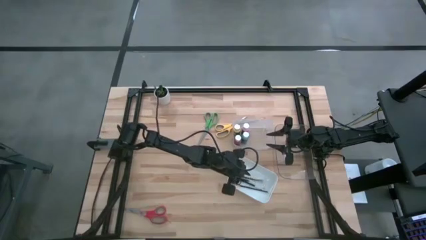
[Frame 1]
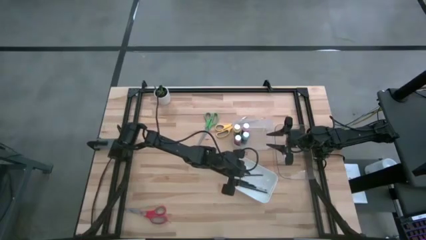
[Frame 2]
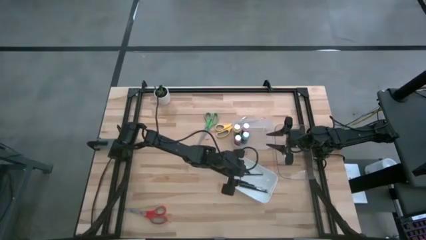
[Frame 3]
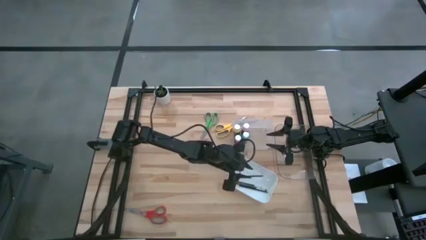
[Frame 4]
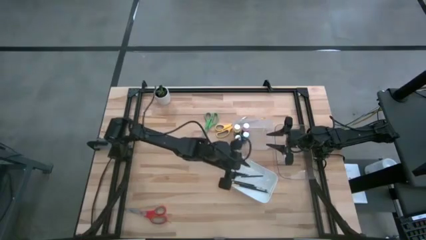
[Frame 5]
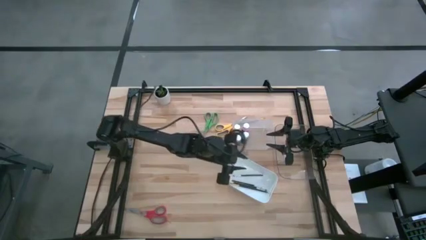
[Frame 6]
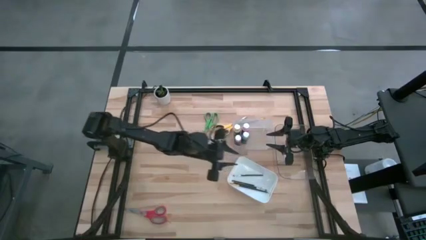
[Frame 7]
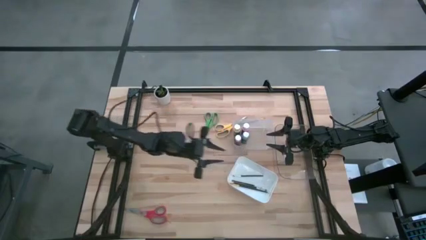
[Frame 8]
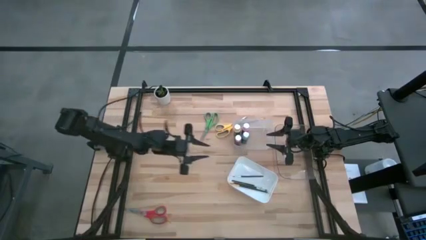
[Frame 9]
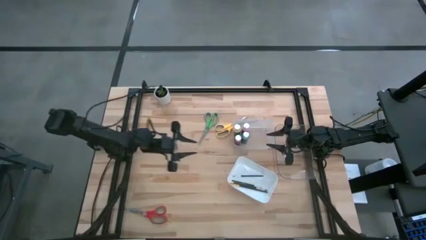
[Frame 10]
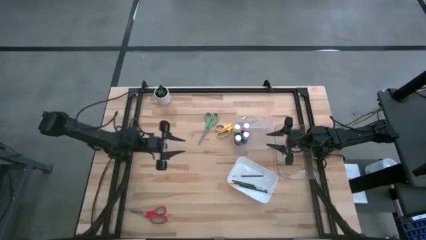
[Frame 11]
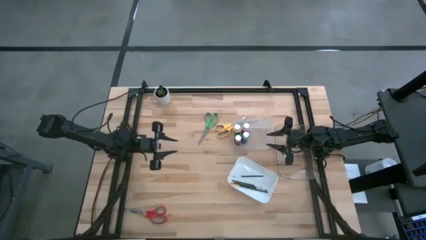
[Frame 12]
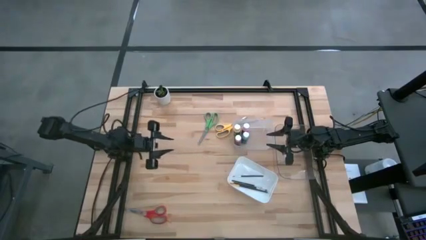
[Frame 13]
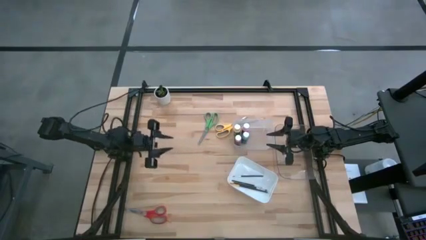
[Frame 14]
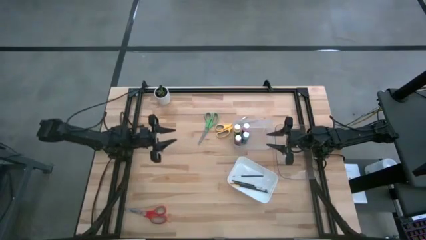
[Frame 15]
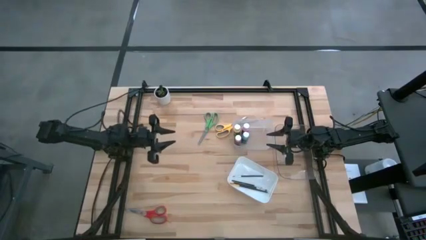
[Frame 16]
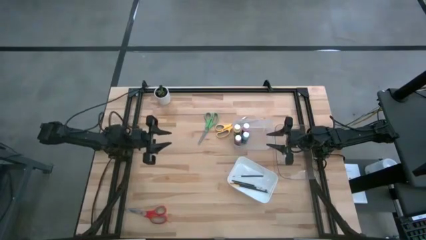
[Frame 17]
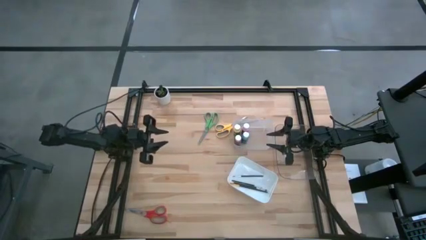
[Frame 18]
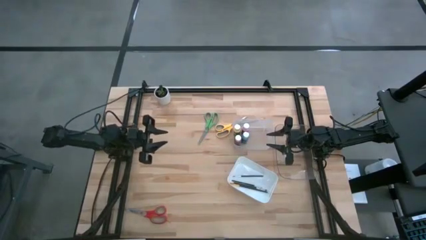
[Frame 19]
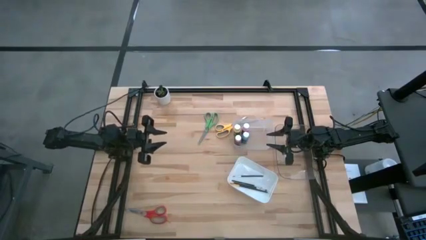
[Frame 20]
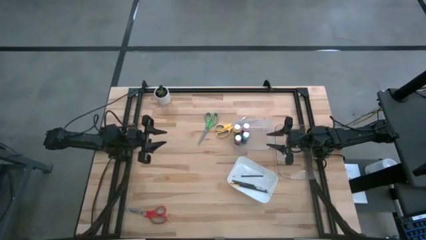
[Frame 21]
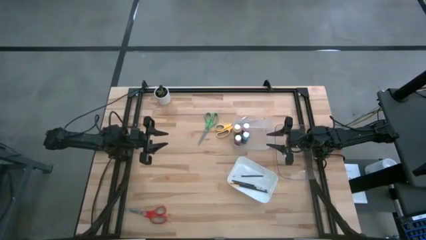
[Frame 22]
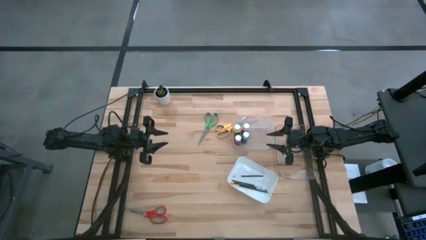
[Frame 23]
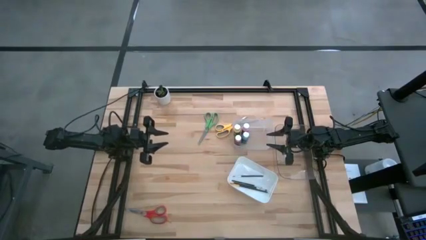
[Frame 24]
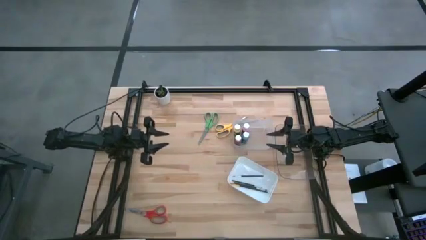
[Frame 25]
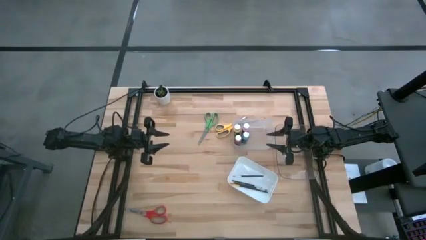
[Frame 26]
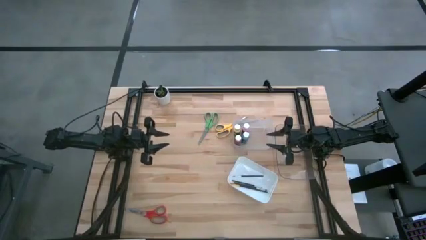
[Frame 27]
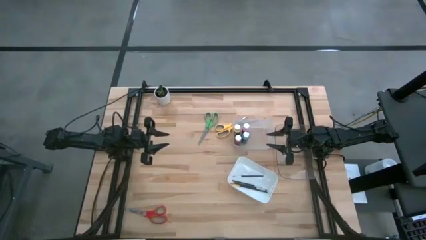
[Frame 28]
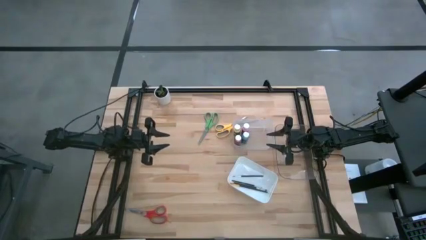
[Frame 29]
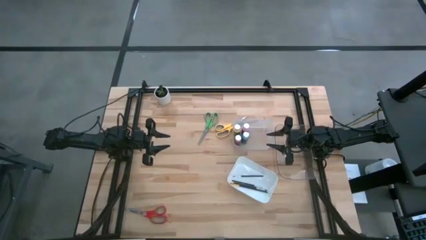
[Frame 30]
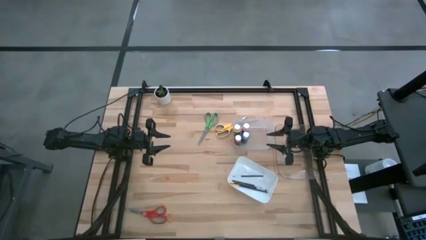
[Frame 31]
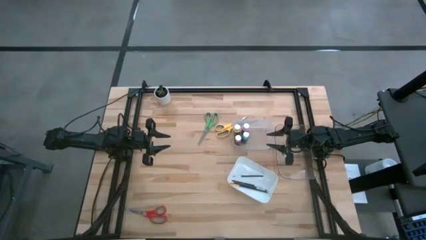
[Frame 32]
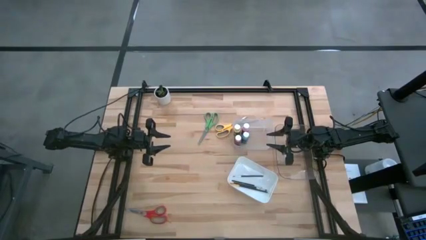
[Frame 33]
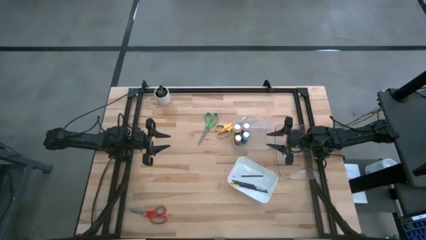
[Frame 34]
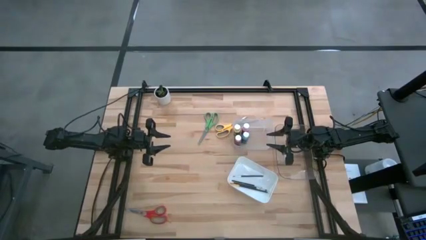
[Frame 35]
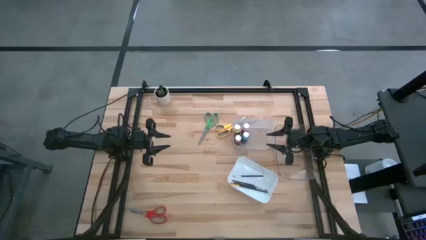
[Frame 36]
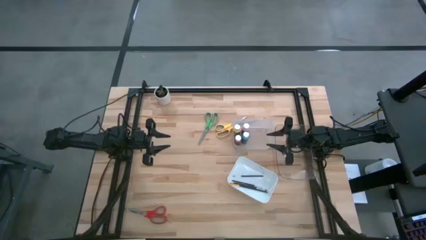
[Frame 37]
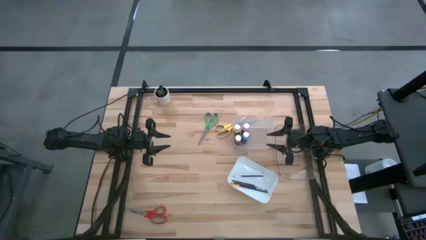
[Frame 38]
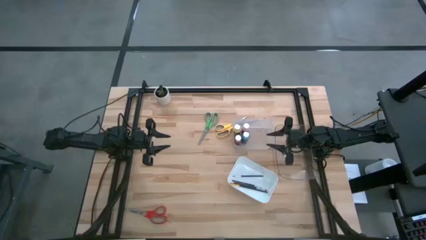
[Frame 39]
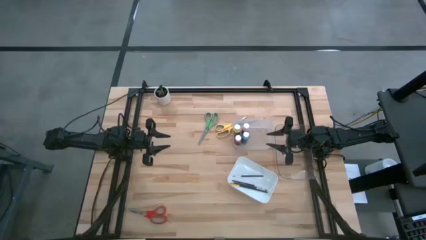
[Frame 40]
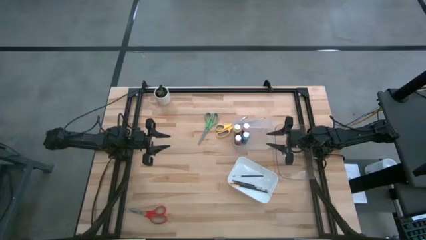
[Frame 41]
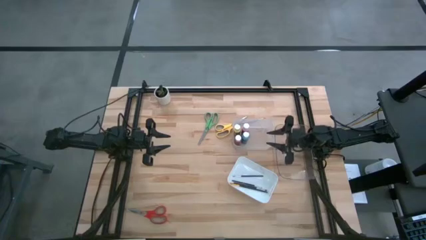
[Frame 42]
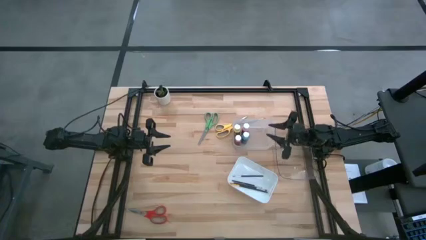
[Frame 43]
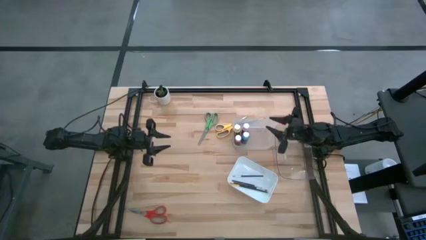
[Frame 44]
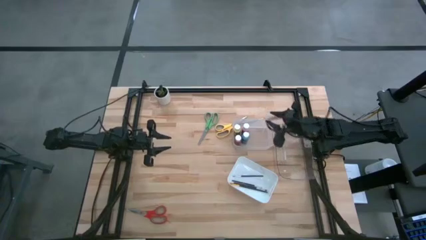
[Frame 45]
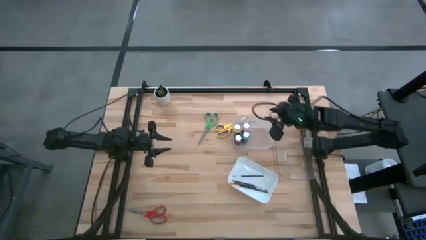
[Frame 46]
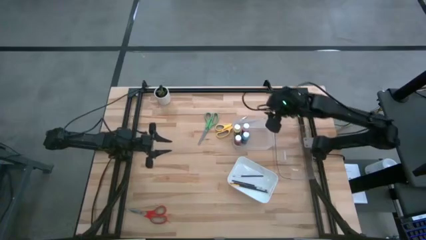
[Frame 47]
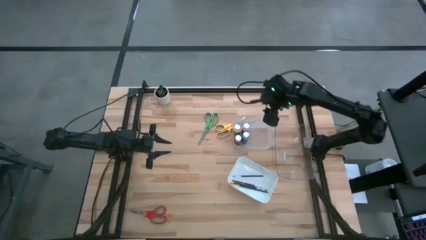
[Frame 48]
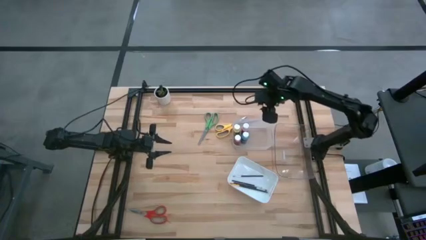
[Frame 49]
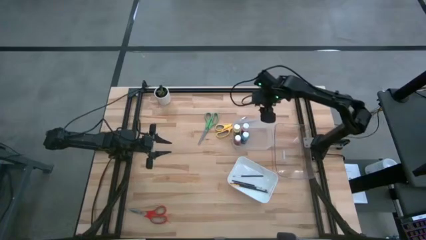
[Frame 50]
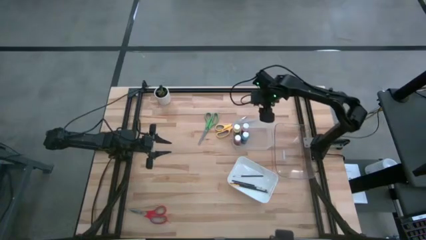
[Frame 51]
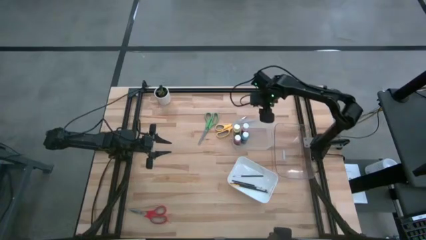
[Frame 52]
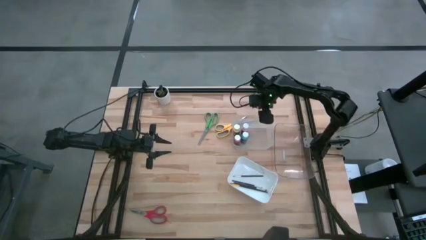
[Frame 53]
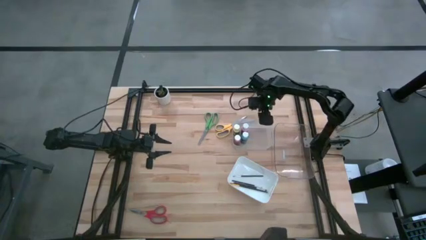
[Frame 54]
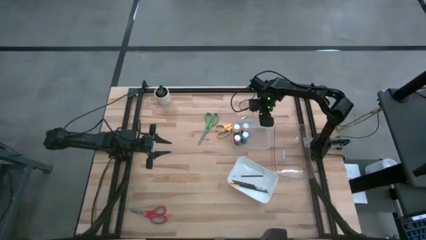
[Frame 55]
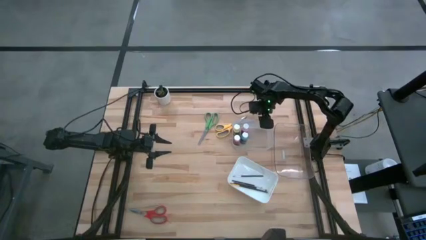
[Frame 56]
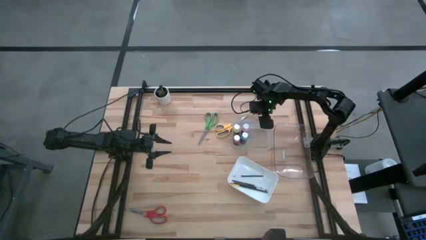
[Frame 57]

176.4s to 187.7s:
Task: Pick & Place Paint Supplies
Put the black paintbrush into the white bin

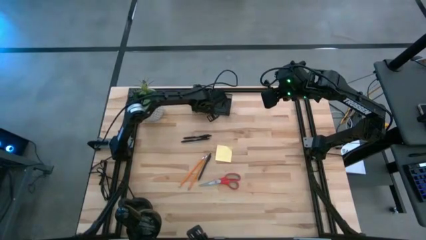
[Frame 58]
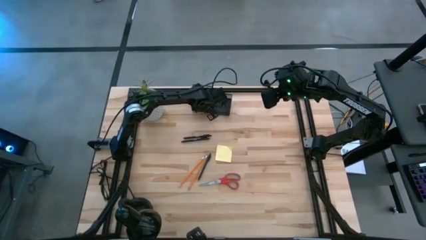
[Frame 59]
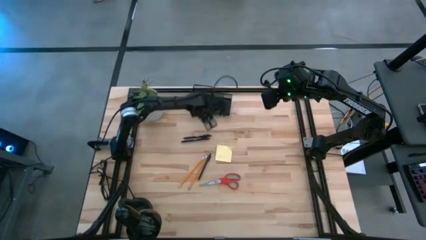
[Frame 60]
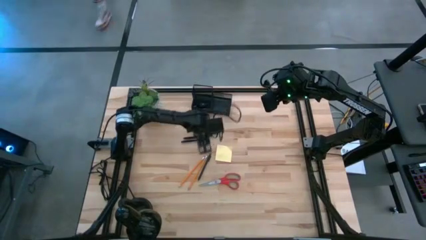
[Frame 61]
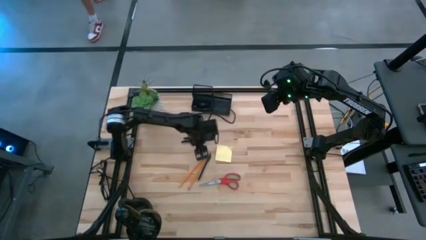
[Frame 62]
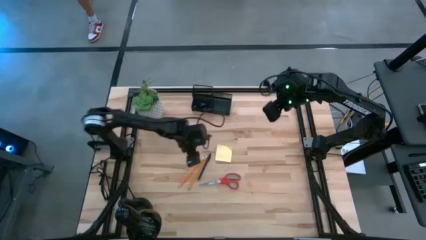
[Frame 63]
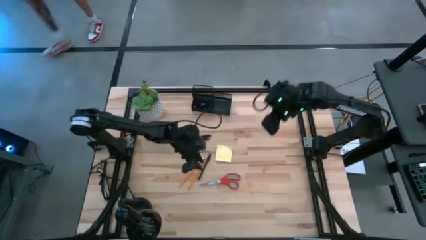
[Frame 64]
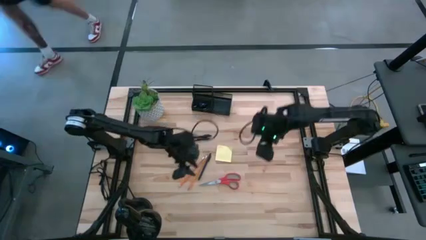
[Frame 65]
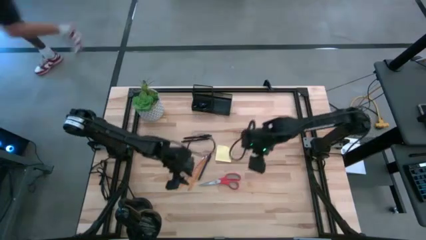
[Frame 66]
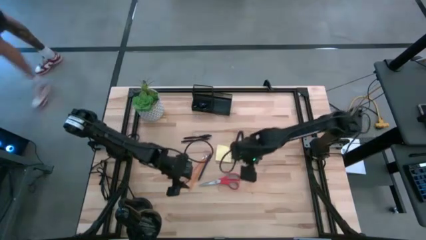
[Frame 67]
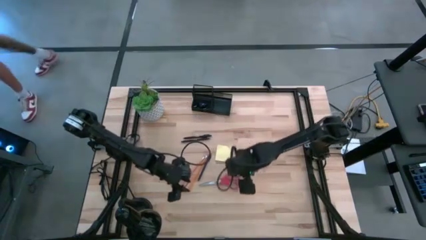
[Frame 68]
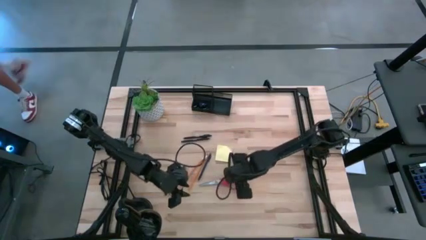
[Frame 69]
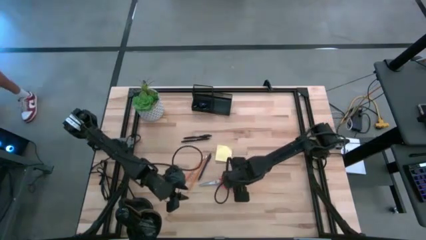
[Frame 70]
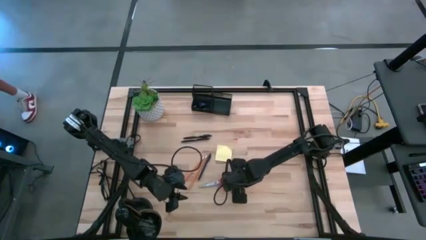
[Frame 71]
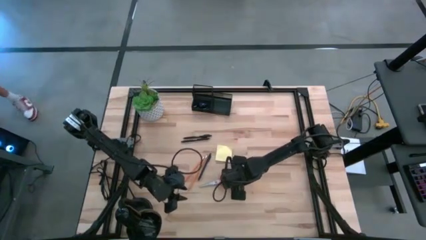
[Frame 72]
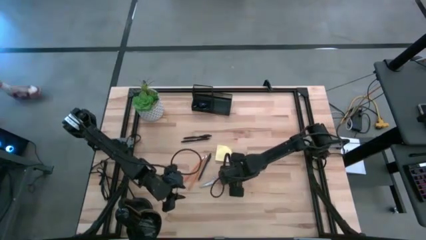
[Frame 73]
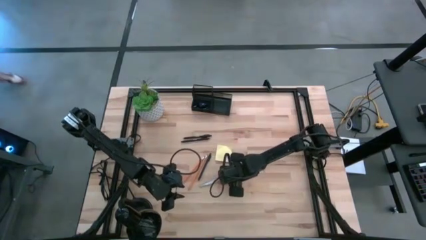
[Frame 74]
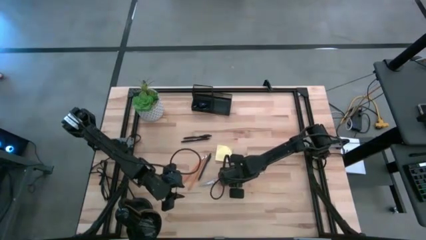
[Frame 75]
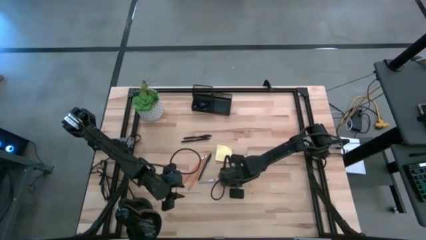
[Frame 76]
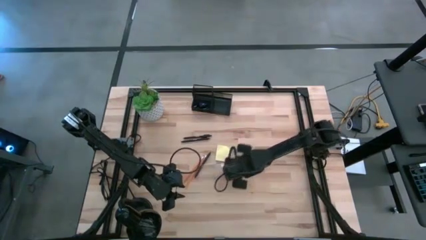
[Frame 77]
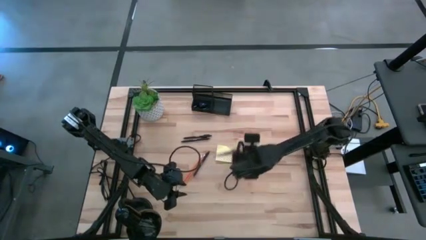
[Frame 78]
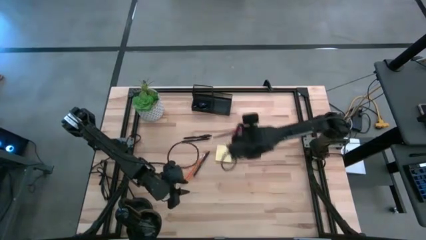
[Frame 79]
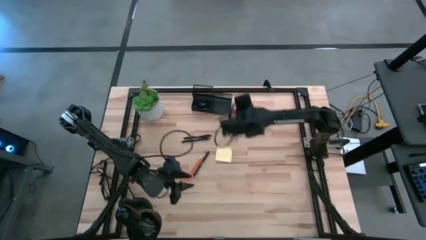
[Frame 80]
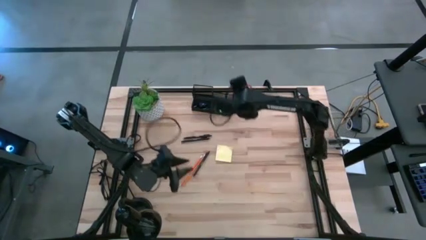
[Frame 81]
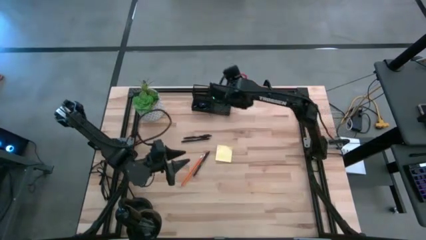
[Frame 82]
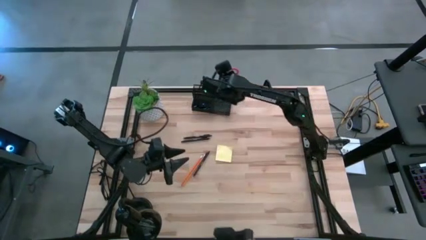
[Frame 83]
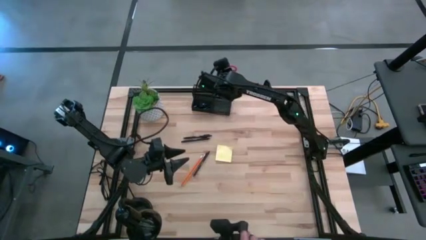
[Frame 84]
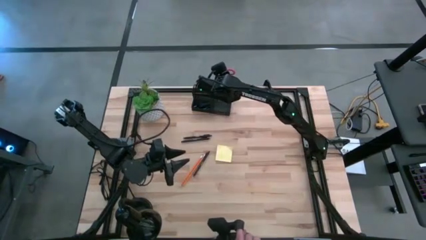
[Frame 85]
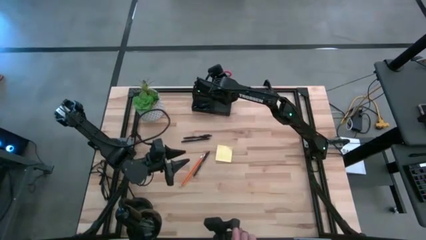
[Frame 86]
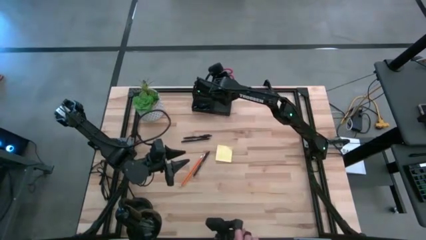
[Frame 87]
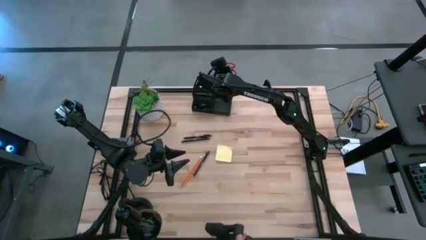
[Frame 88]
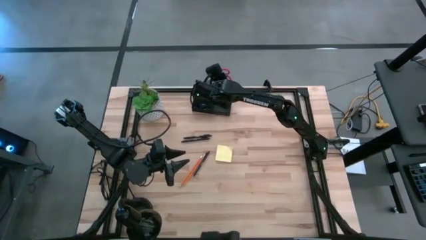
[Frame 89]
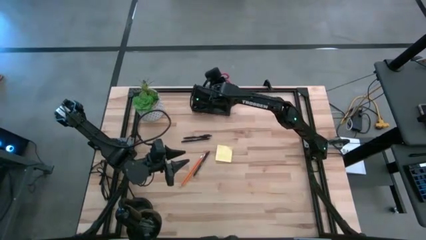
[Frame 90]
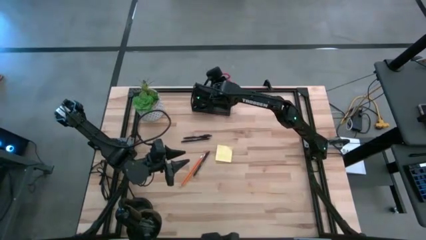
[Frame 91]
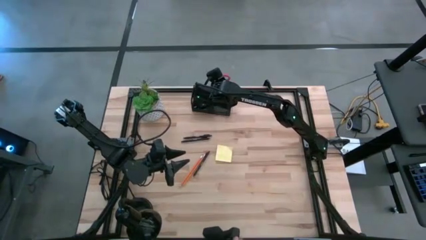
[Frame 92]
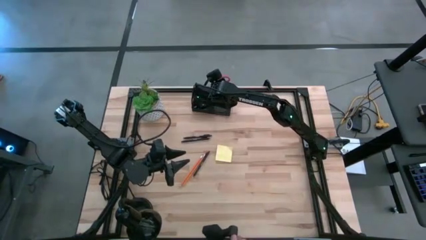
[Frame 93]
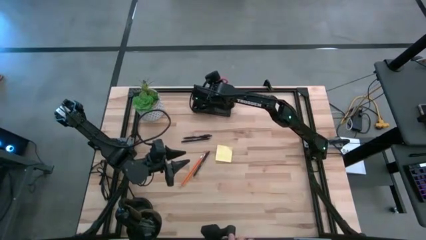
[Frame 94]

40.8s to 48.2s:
Task: Pick and place office supplies into organizer
Put the scissors into the top left section of the black desk organizer
